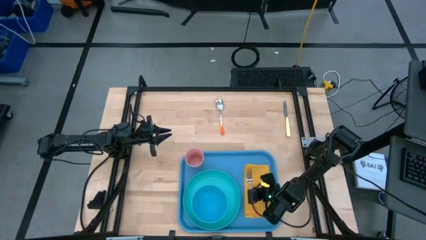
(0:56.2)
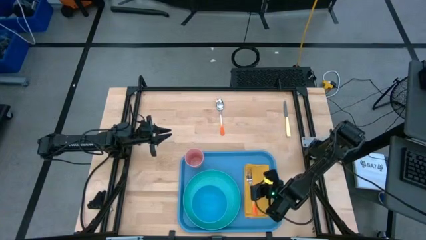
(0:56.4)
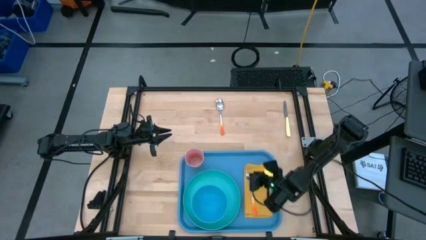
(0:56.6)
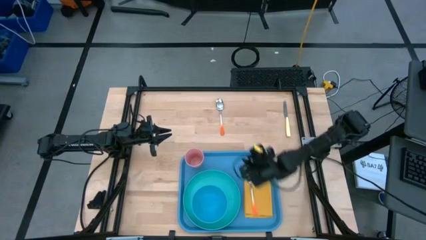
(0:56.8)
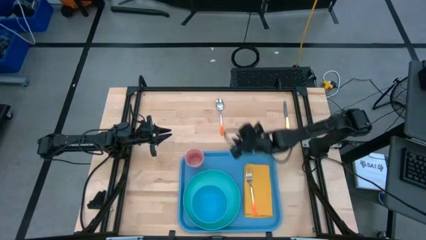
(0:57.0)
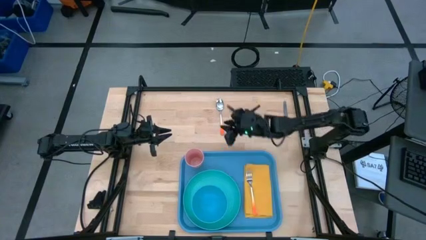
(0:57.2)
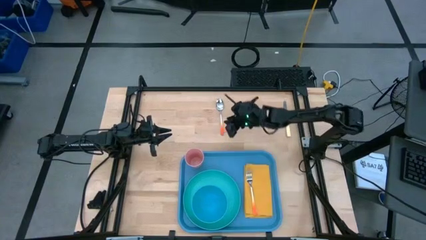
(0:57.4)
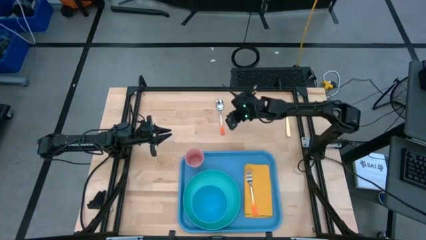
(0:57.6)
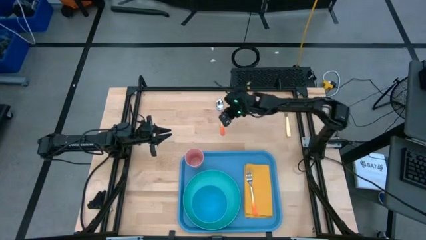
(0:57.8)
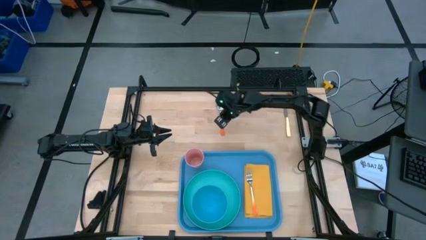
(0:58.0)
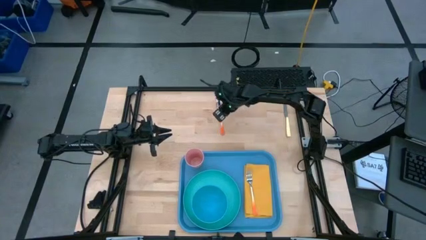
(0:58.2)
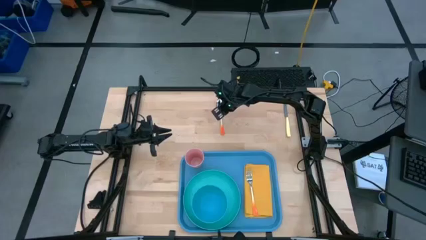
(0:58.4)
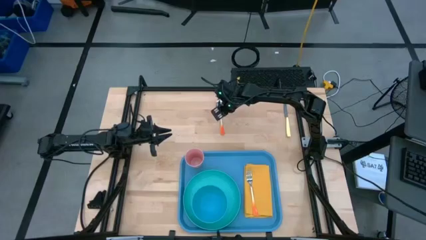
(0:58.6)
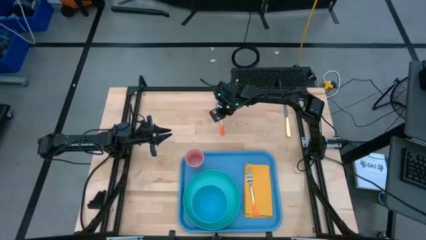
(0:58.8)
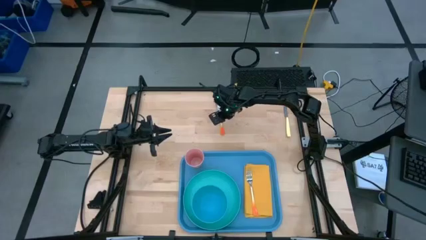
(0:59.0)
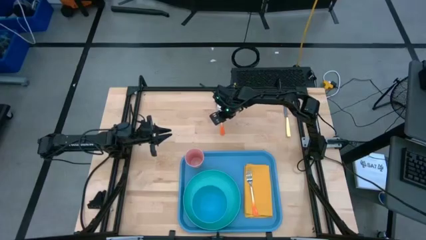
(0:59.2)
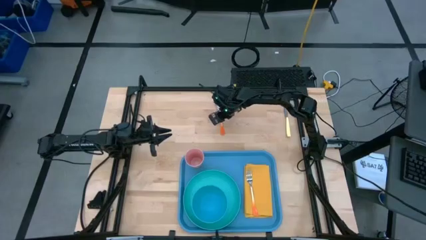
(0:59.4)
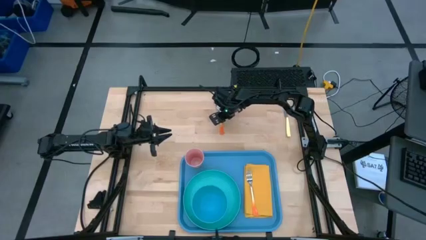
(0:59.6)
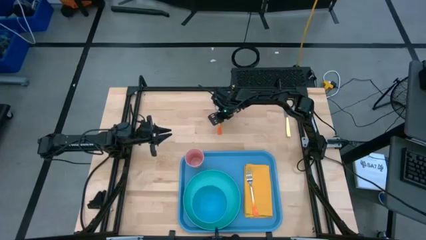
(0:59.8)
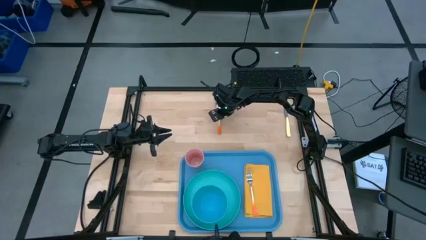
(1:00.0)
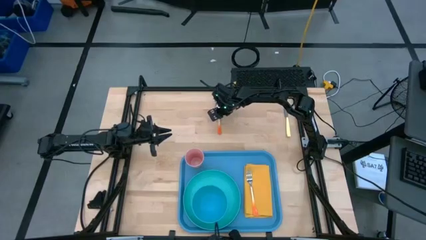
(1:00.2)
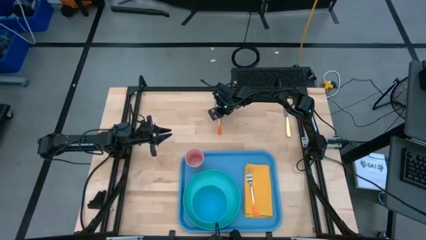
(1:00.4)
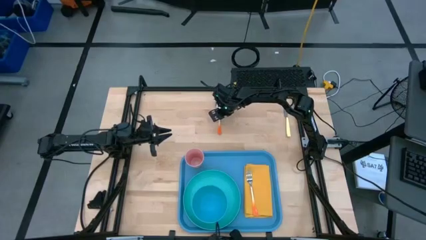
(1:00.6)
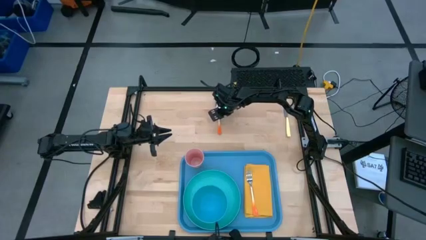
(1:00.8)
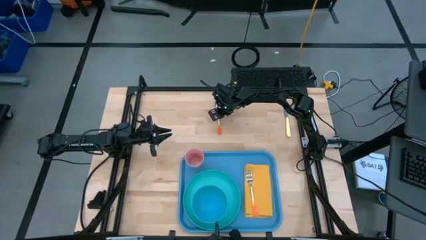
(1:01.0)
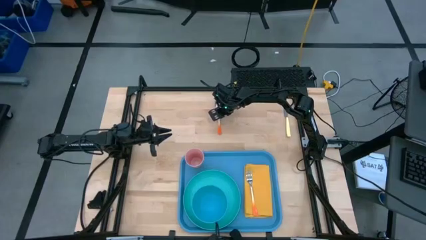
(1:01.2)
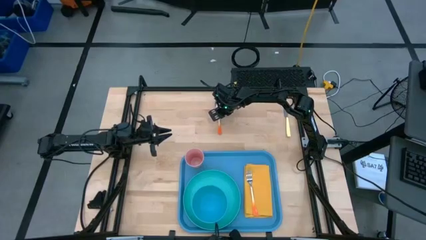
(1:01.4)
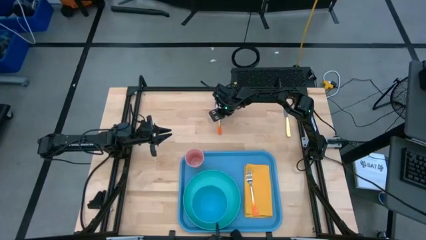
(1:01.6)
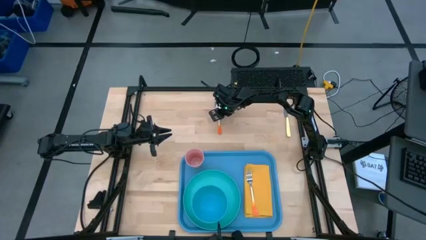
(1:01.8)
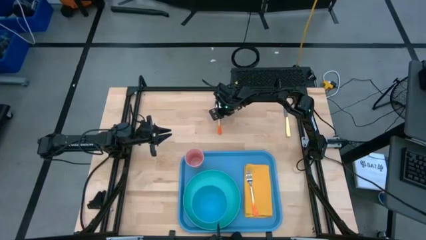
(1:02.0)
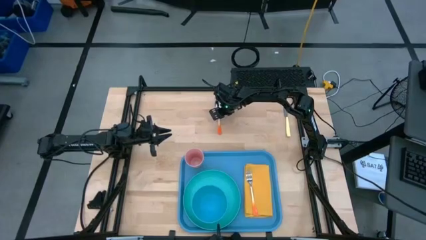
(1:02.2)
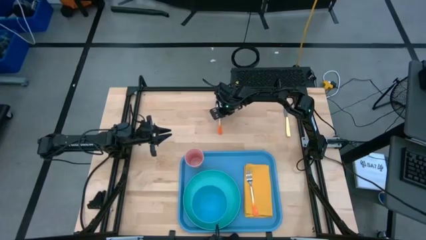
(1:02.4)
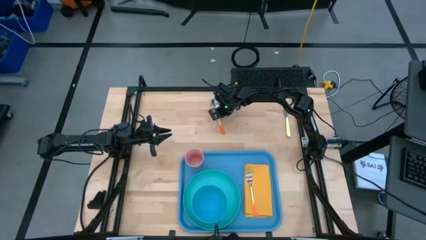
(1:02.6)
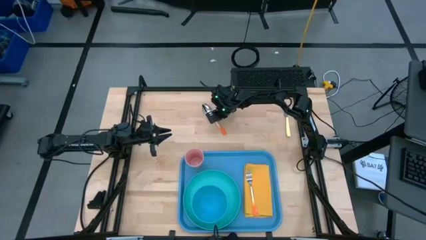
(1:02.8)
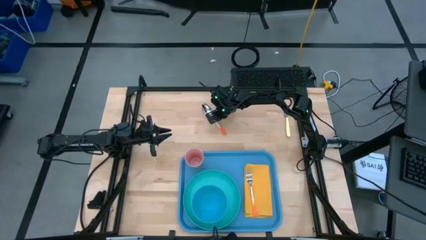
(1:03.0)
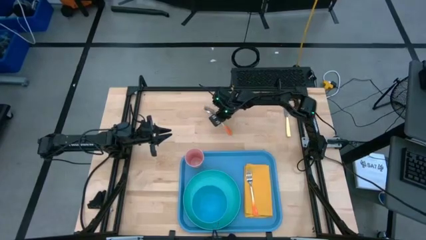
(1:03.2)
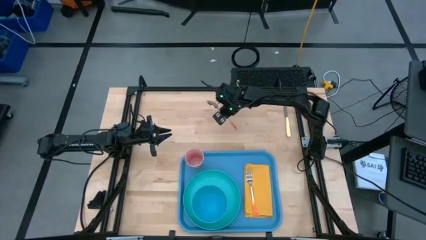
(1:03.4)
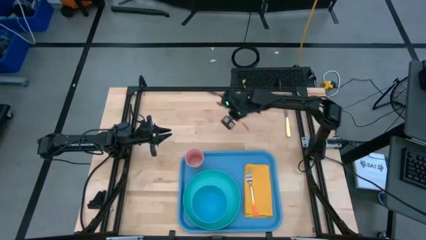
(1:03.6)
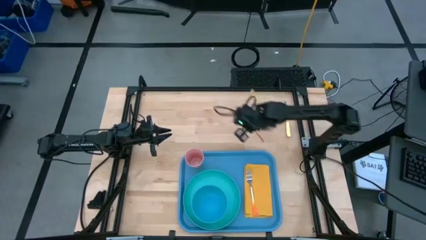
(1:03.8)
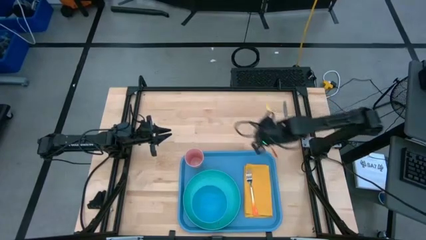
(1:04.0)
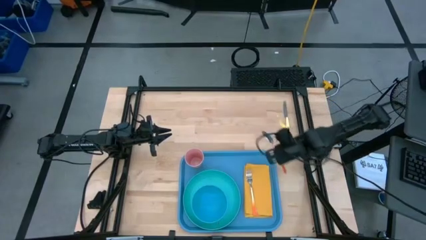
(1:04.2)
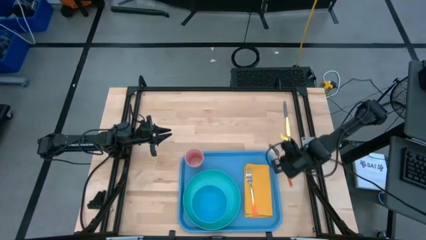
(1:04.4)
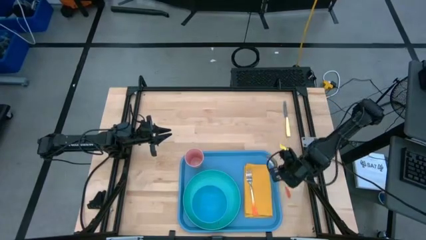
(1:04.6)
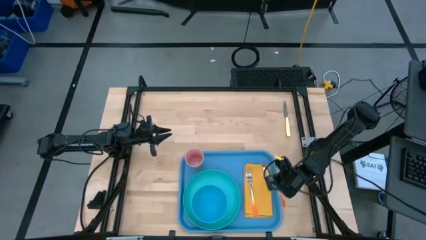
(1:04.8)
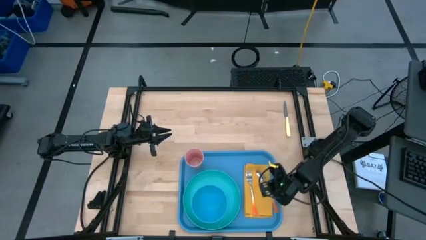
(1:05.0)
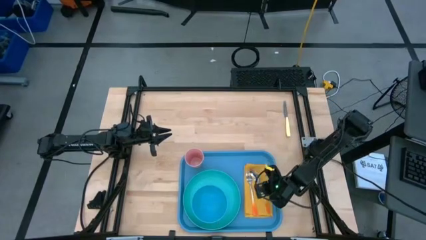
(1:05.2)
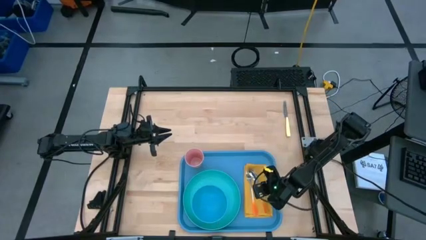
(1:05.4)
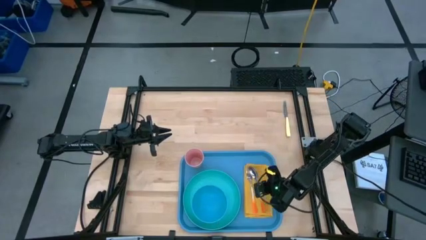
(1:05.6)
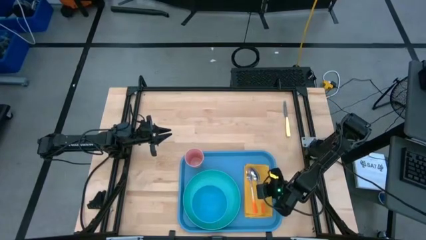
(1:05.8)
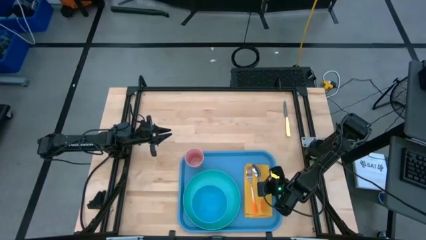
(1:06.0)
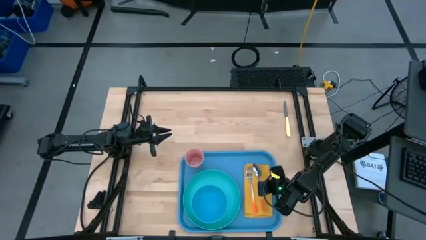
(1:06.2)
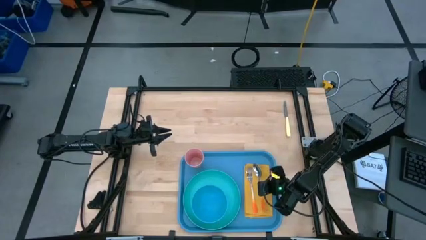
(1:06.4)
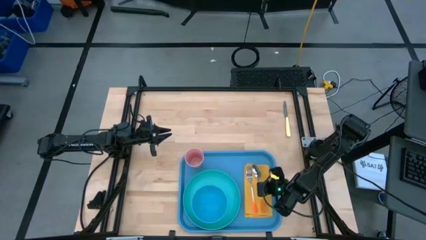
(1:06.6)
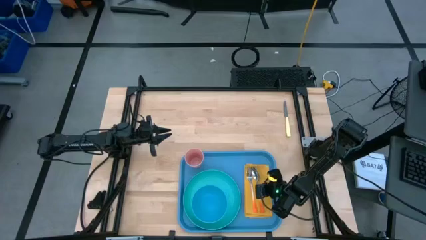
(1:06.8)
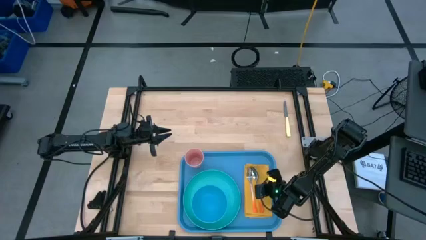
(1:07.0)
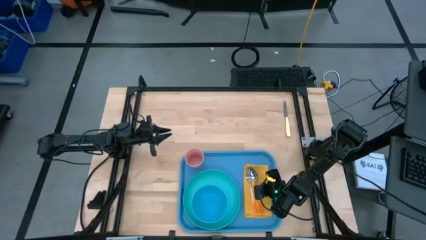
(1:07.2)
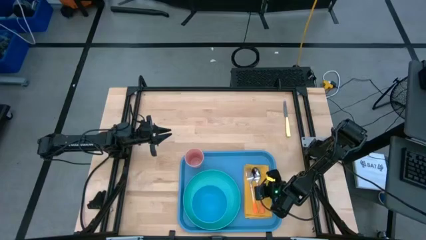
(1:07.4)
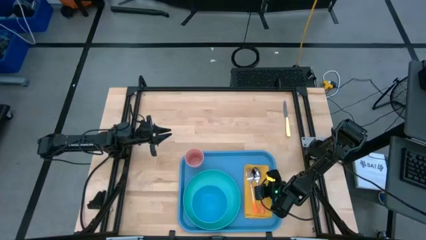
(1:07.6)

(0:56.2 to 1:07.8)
Task: Set up tray
Put the orange spoon on the yellow napkin
